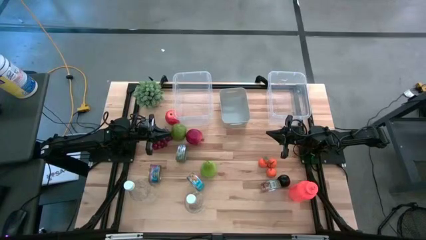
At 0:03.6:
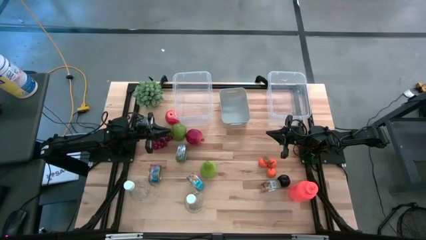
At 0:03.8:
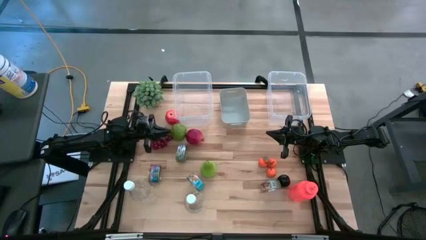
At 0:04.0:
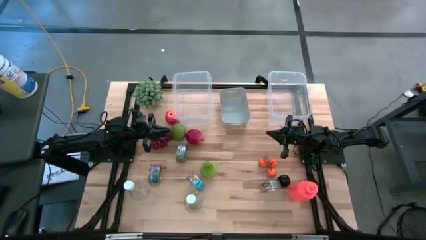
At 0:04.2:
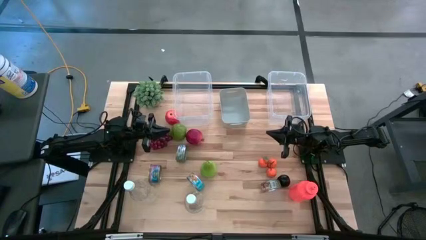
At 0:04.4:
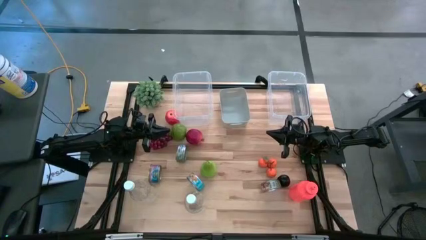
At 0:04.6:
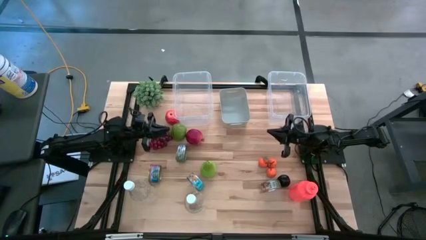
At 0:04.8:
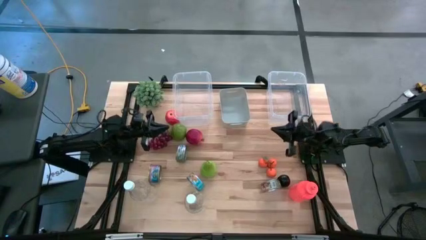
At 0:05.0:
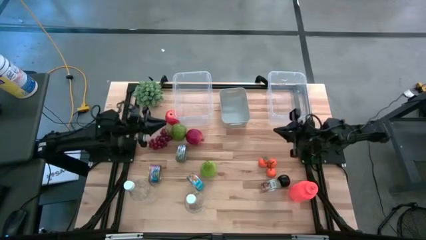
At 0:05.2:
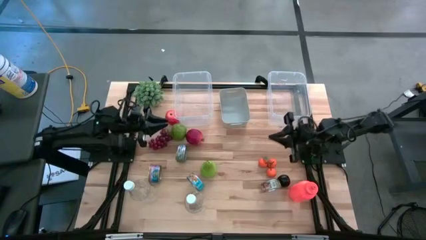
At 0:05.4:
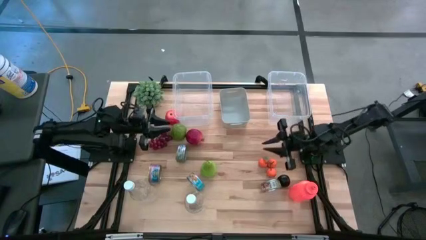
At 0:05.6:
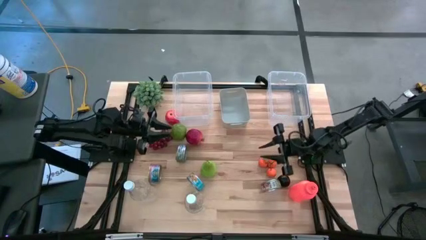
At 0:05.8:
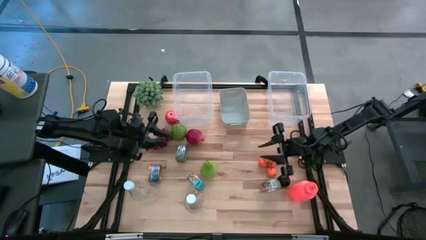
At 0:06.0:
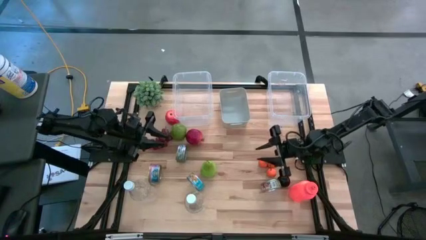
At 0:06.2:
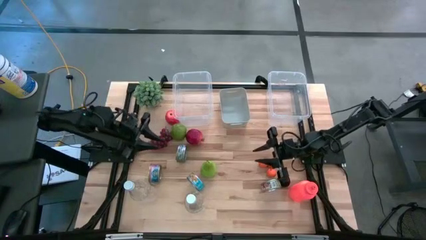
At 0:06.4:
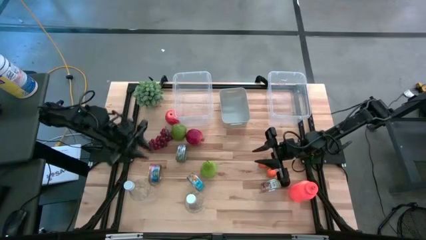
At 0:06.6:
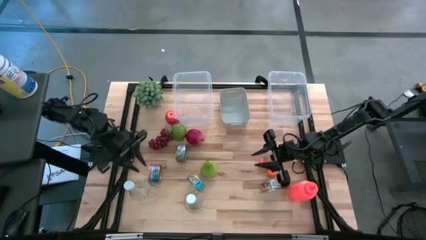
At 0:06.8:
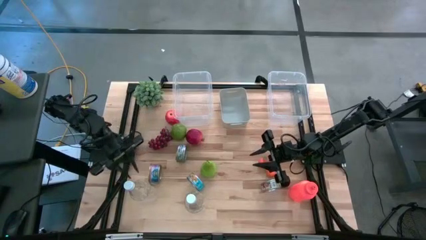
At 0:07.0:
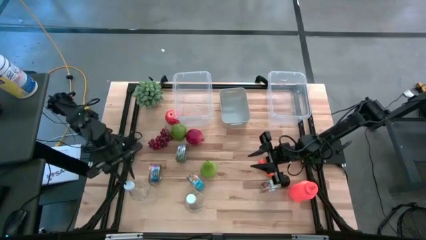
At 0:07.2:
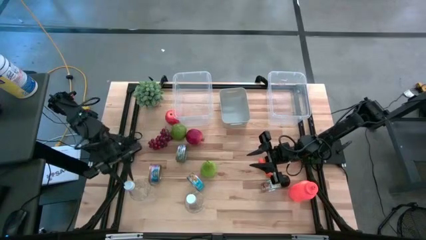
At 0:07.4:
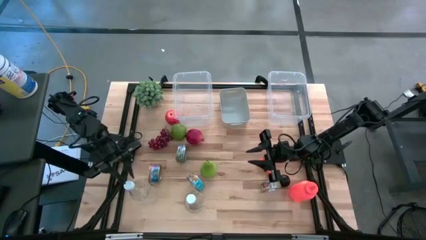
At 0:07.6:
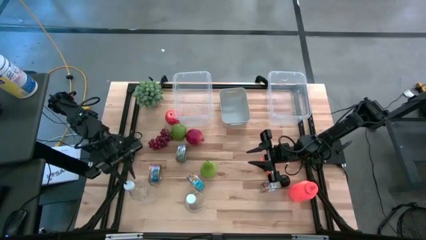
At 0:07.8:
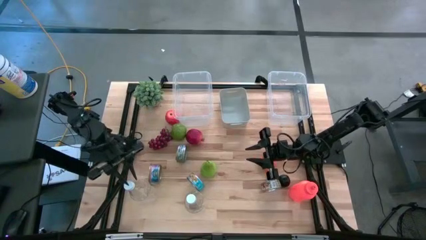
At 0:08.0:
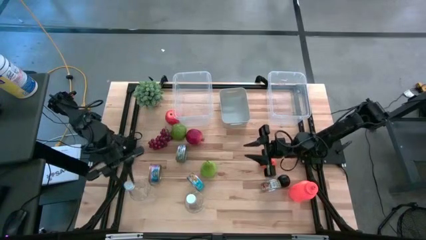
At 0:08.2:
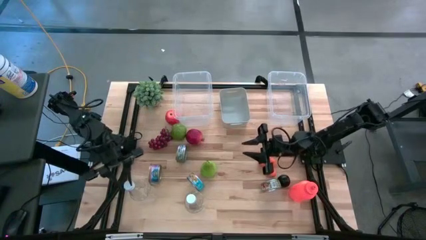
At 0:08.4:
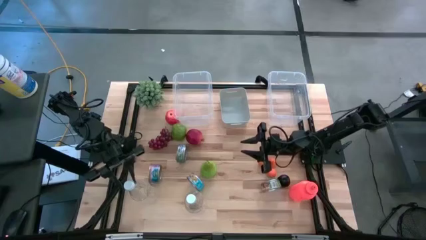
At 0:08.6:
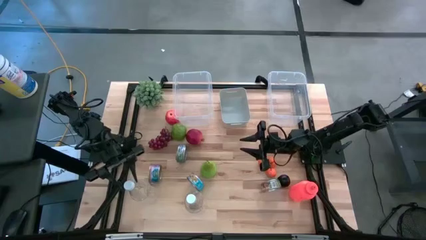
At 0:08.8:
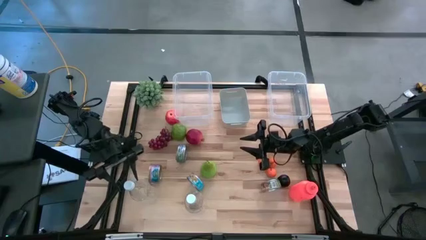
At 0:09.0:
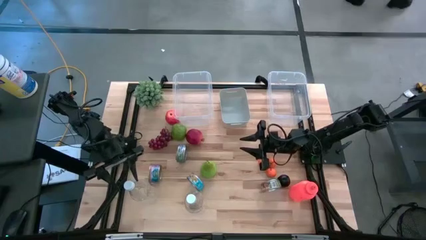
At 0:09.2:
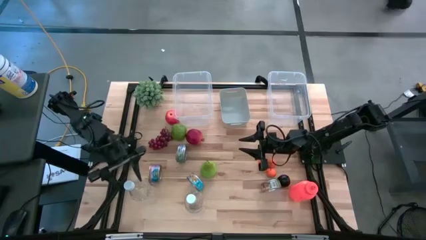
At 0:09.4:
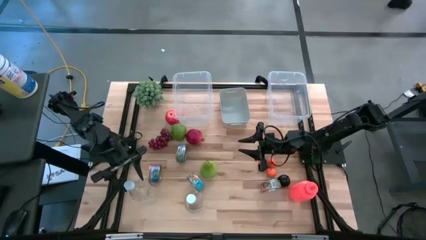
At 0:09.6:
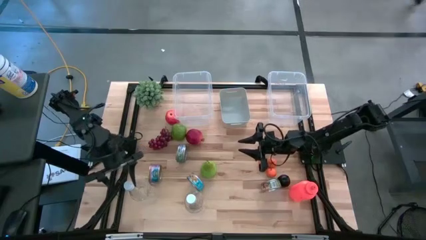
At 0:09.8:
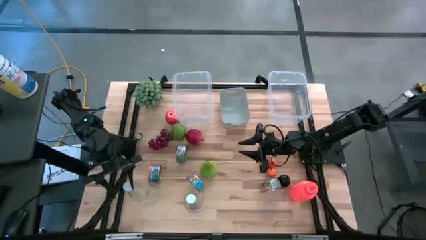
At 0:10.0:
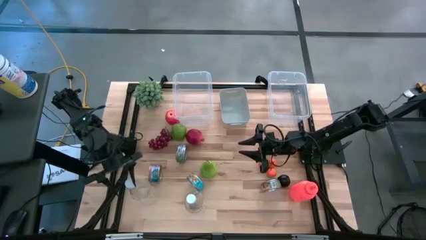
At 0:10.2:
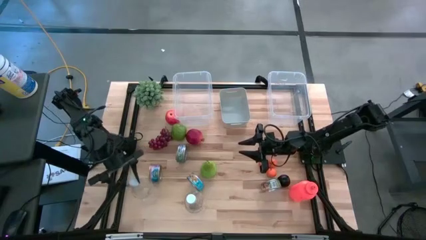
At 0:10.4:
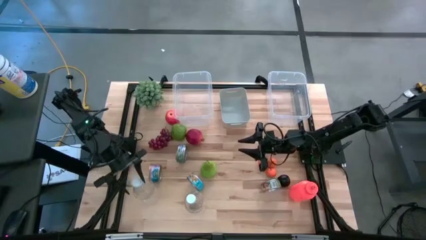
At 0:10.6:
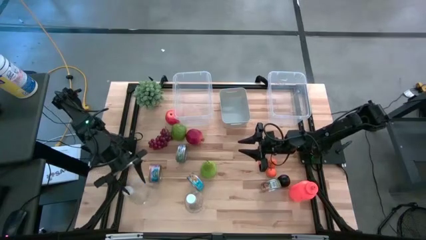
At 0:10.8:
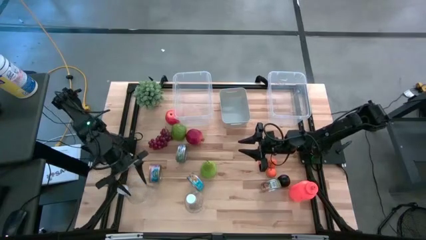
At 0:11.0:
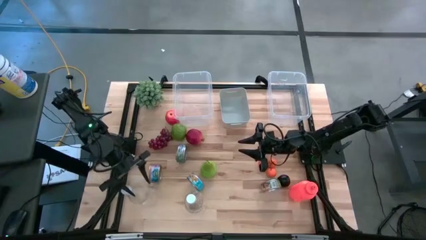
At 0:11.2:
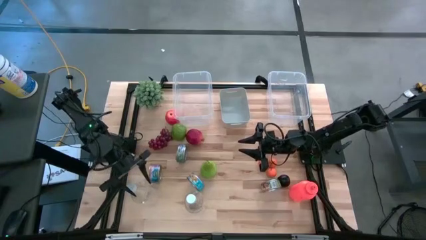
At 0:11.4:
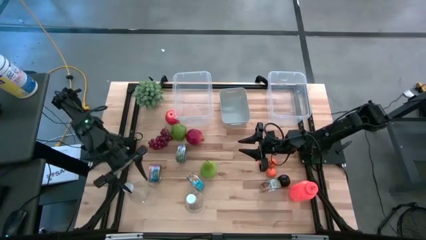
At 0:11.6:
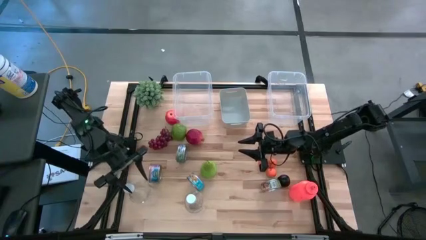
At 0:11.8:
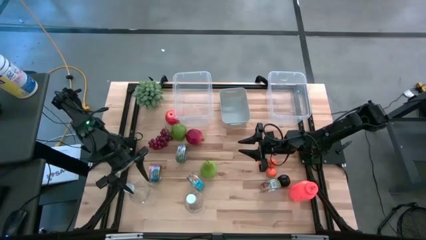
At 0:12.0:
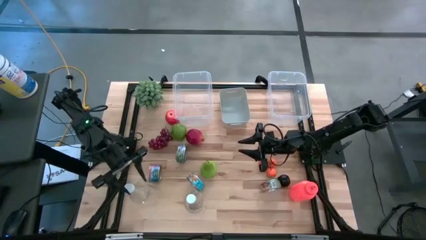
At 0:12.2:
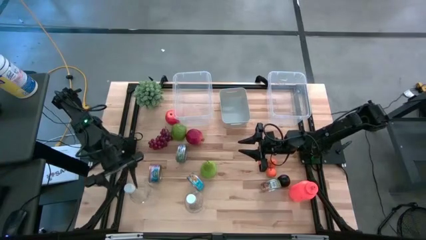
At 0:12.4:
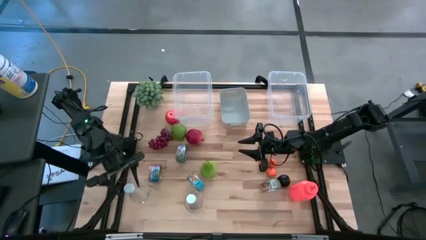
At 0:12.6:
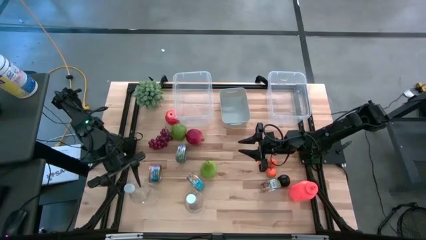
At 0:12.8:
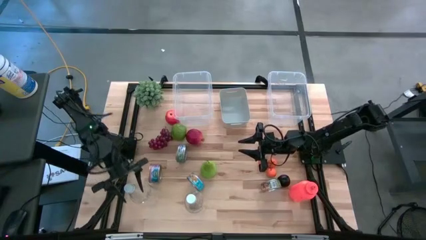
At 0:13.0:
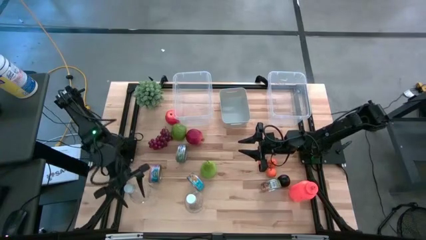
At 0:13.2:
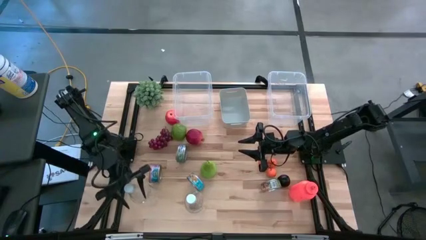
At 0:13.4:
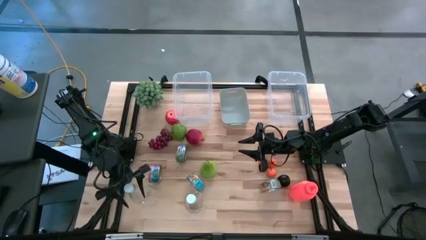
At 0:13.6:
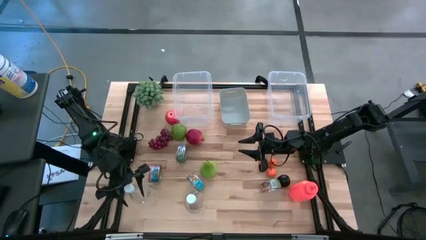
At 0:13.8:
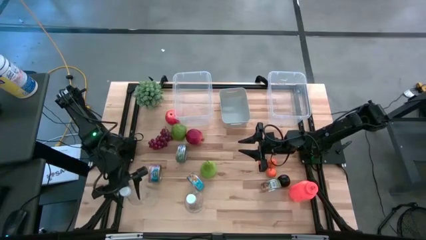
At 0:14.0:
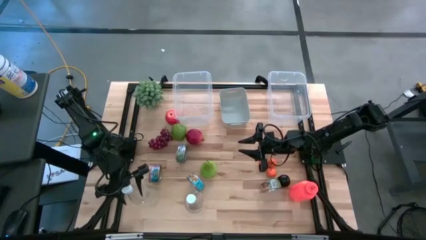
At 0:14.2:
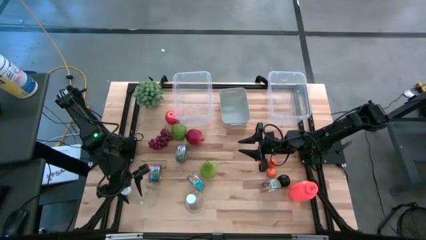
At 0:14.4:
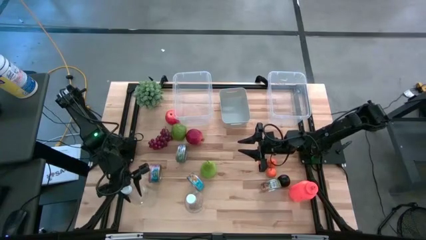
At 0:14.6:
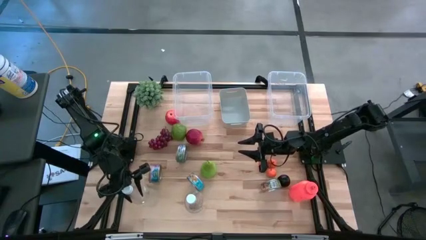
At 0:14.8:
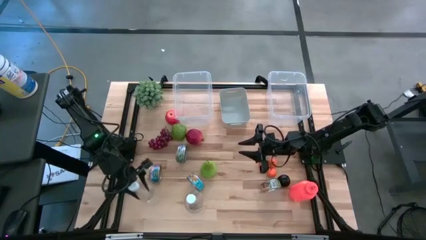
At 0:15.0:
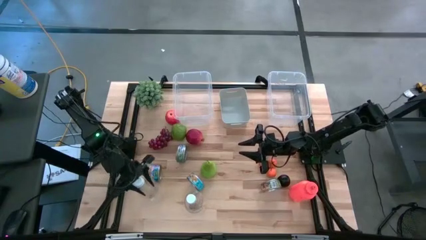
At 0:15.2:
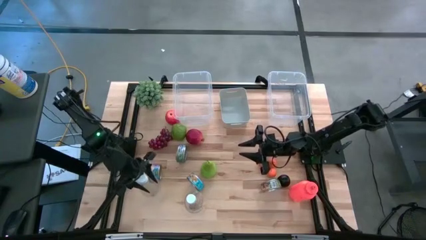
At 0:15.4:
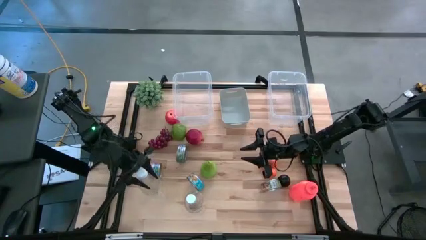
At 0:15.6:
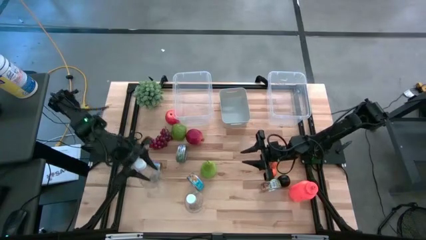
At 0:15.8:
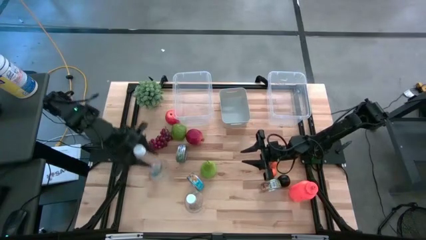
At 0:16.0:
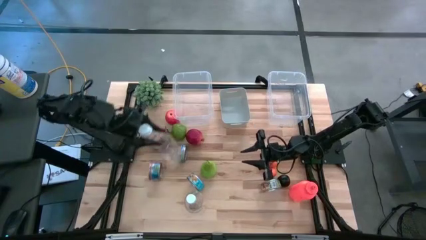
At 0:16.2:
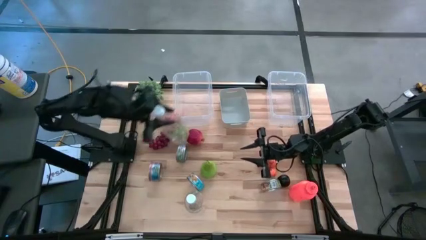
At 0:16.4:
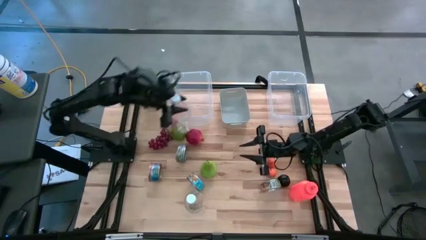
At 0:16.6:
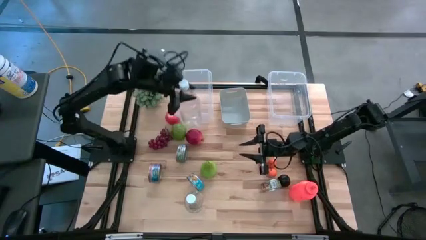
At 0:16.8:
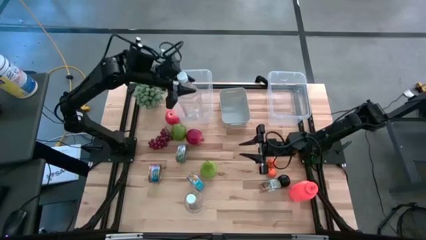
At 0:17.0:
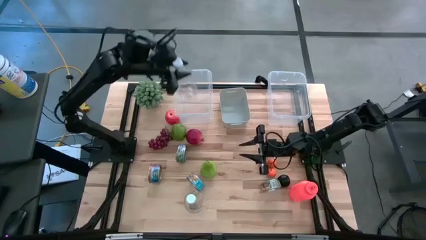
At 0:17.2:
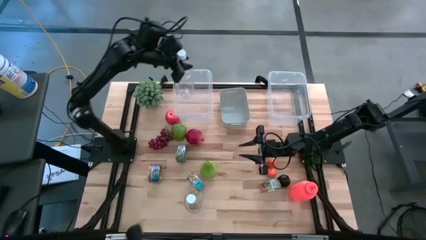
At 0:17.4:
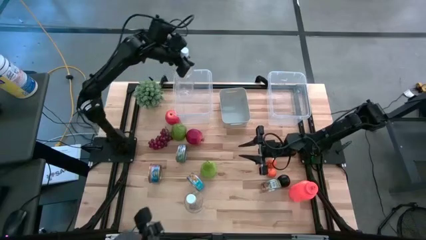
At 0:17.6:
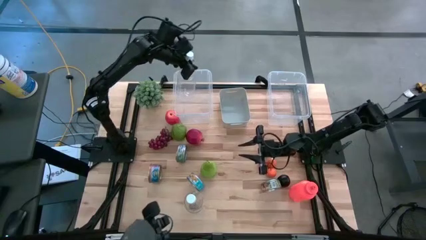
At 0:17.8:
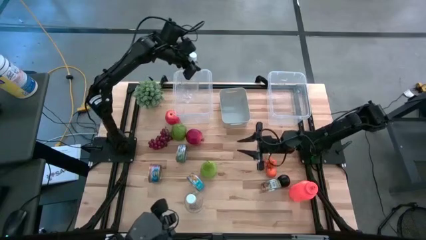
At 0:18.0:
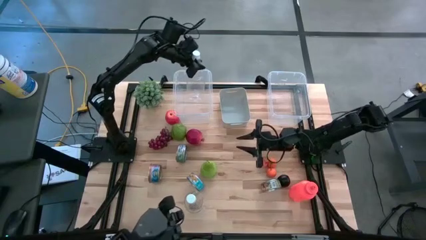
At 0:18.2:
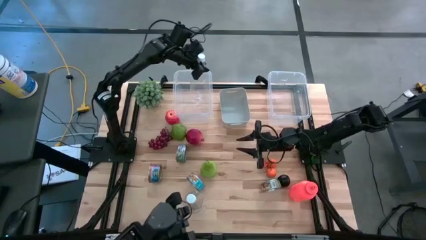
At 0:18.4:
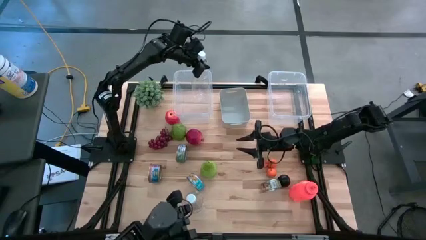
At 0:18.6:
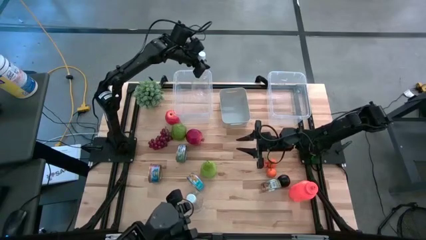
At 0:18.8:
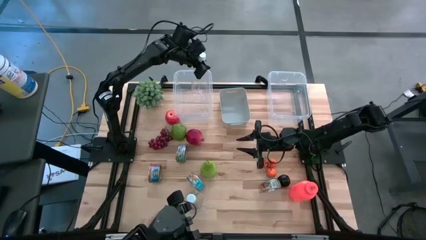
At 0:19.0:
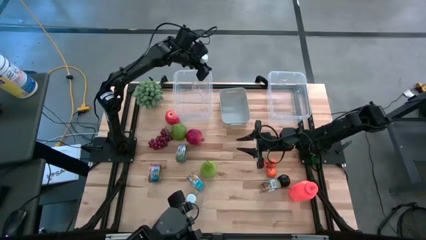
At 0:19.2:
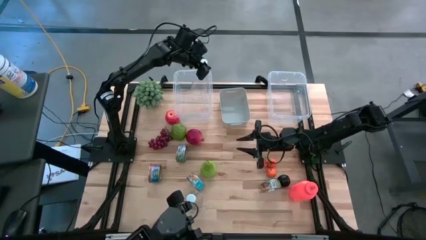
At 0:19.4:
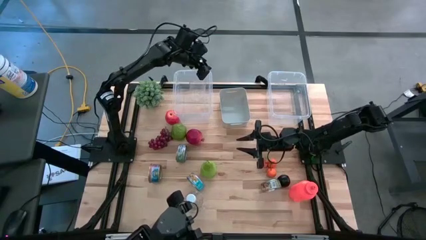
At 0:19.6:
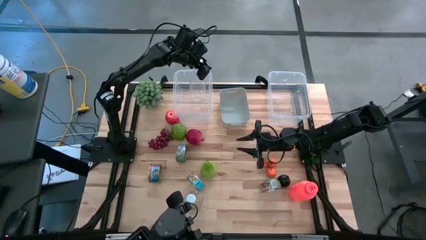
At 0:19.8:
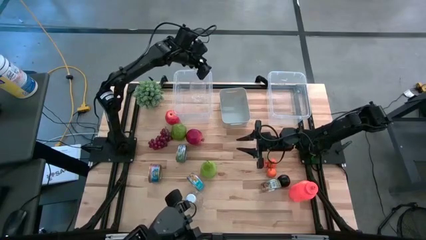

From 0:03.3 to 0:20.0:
Task: Pick & Place Food Item
Put the transparent bottle into the left transparent bin
